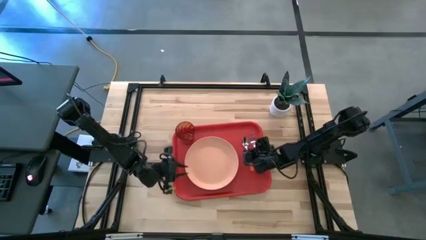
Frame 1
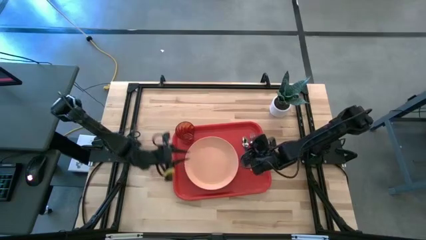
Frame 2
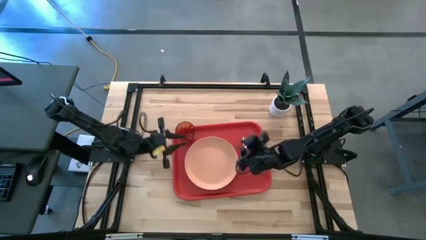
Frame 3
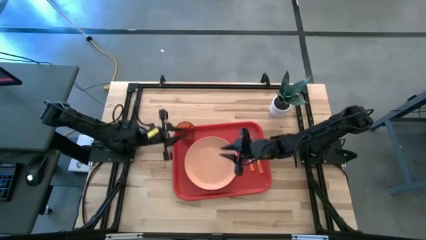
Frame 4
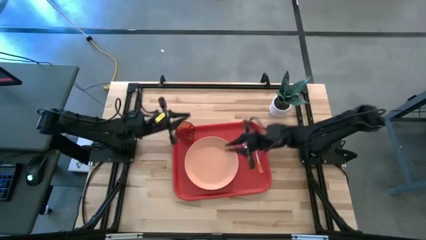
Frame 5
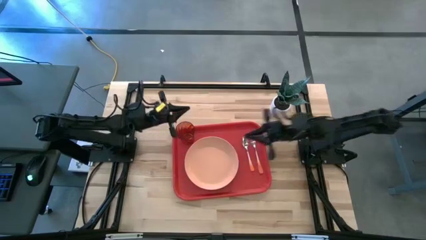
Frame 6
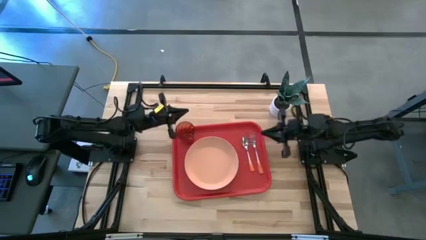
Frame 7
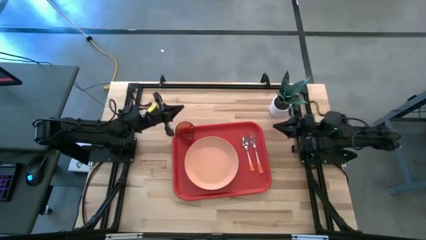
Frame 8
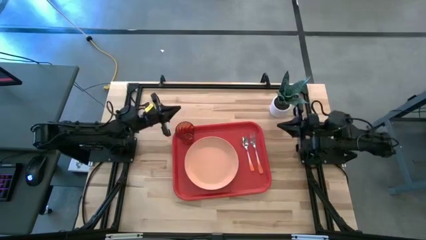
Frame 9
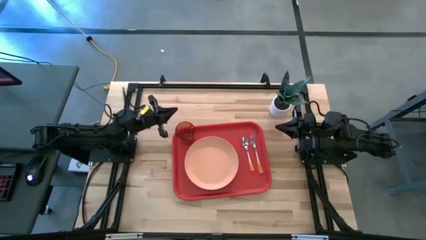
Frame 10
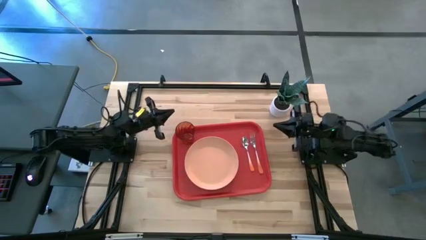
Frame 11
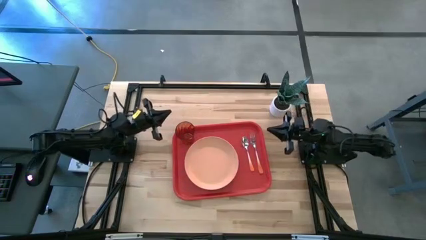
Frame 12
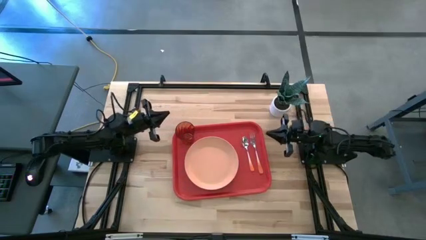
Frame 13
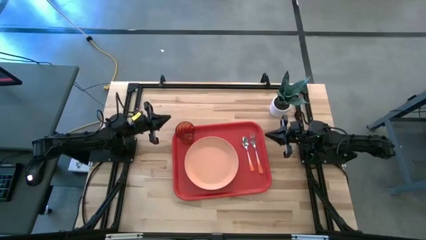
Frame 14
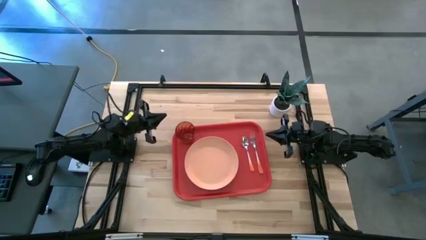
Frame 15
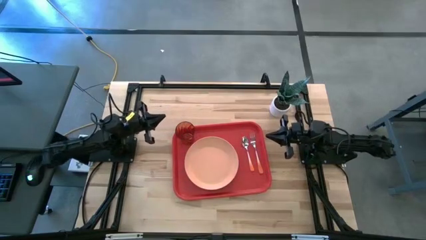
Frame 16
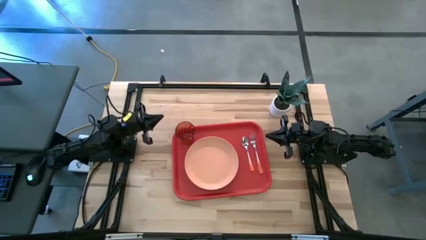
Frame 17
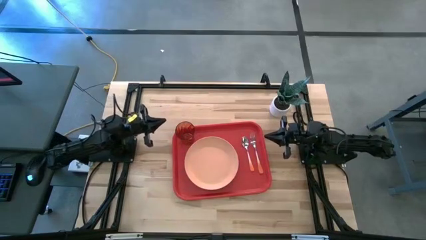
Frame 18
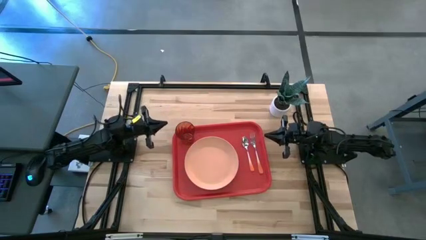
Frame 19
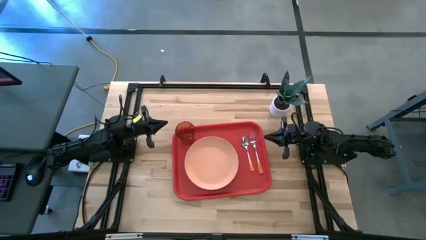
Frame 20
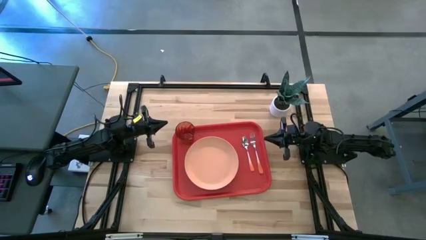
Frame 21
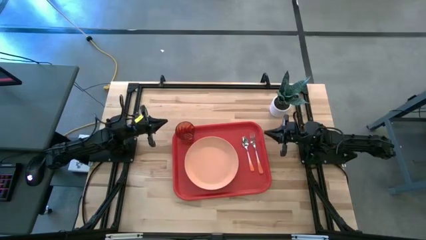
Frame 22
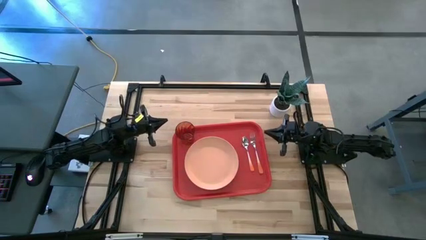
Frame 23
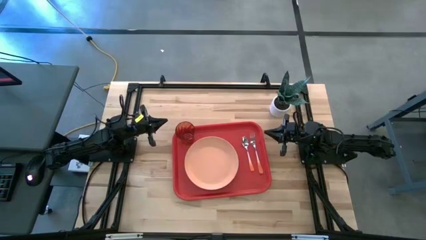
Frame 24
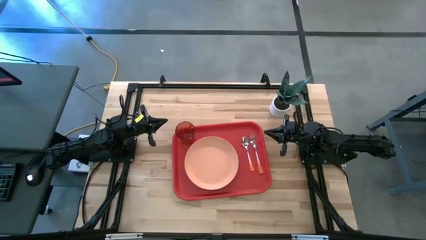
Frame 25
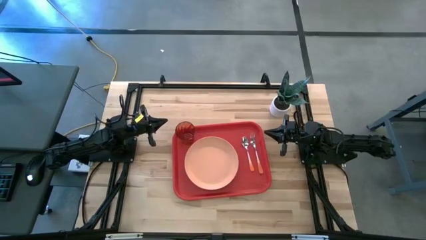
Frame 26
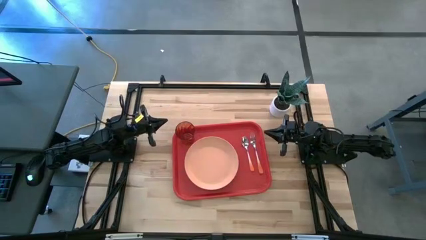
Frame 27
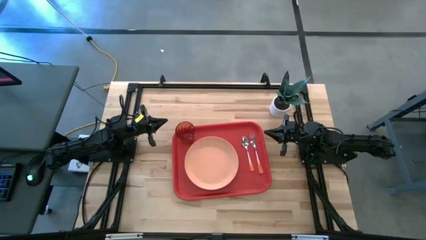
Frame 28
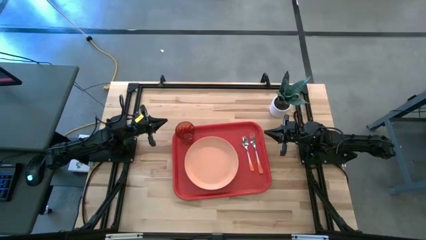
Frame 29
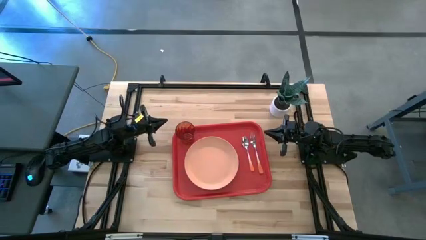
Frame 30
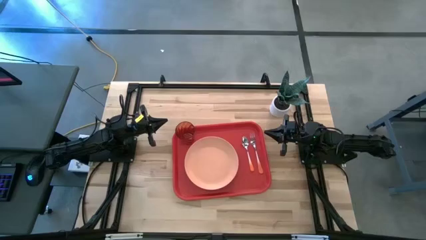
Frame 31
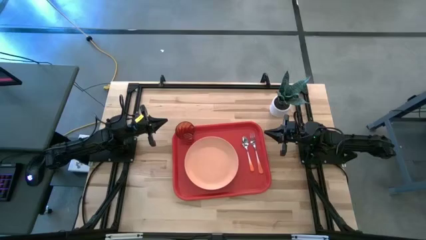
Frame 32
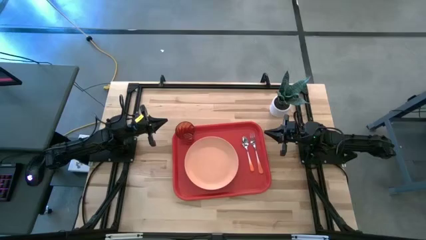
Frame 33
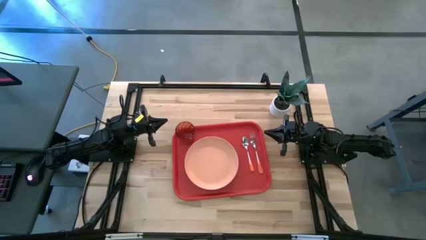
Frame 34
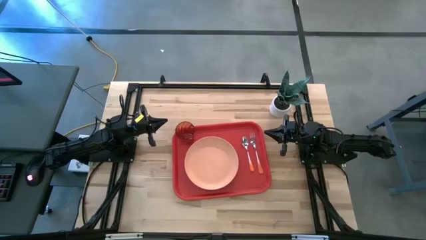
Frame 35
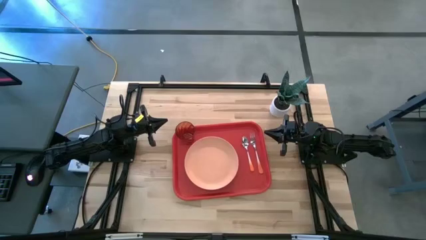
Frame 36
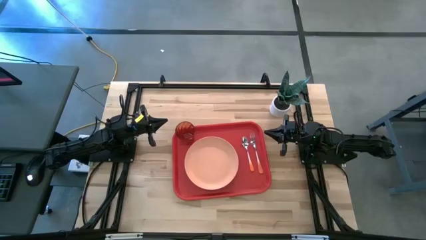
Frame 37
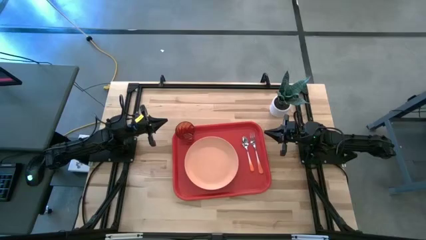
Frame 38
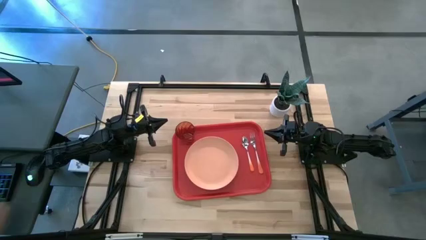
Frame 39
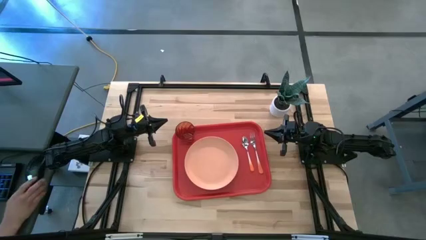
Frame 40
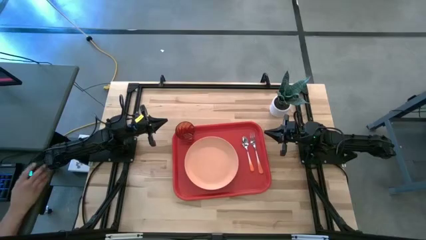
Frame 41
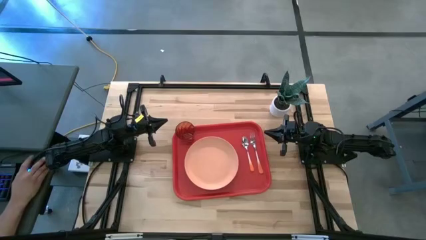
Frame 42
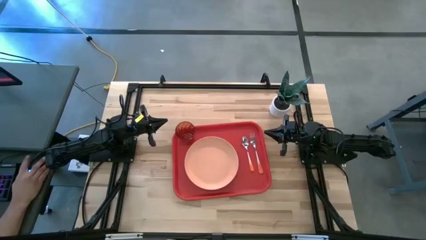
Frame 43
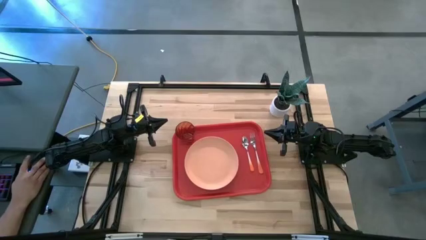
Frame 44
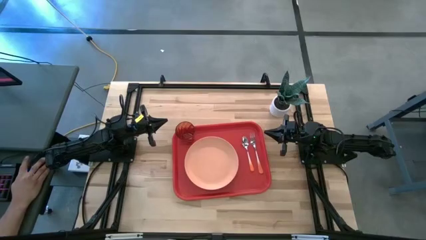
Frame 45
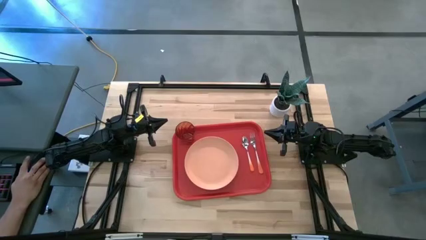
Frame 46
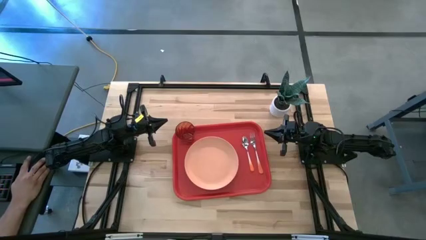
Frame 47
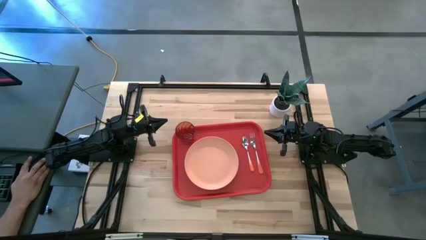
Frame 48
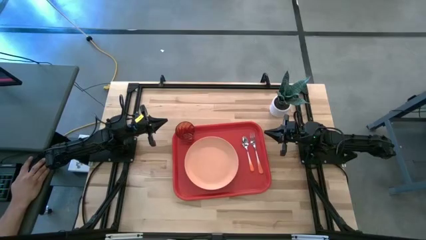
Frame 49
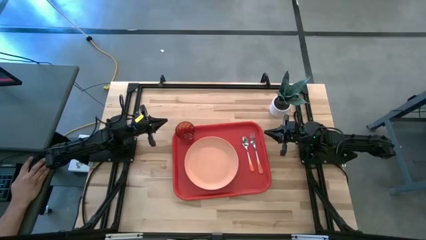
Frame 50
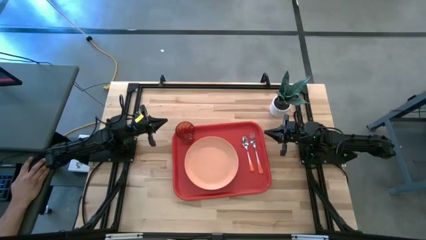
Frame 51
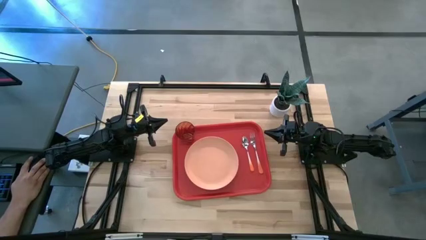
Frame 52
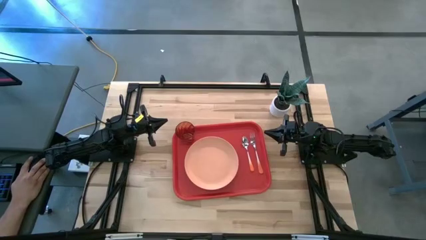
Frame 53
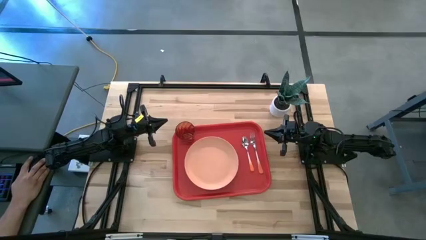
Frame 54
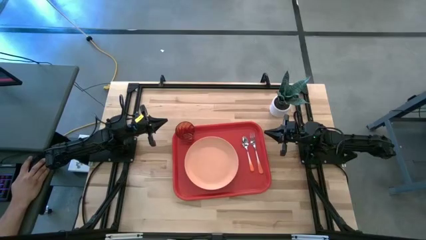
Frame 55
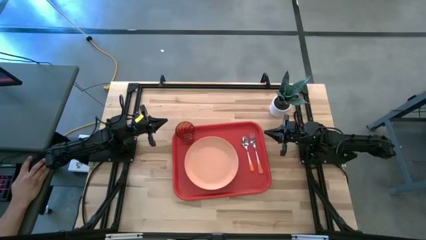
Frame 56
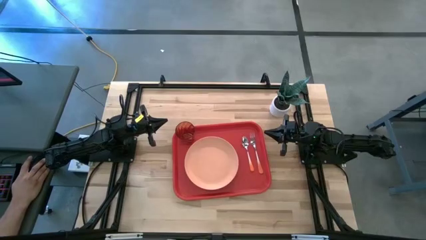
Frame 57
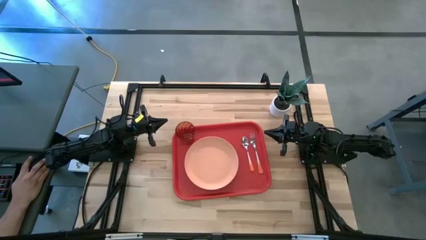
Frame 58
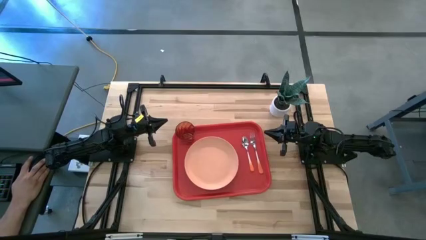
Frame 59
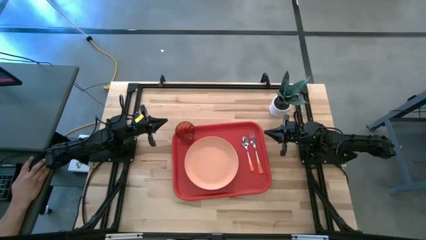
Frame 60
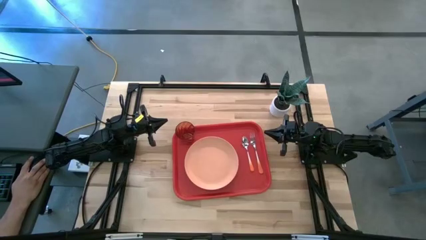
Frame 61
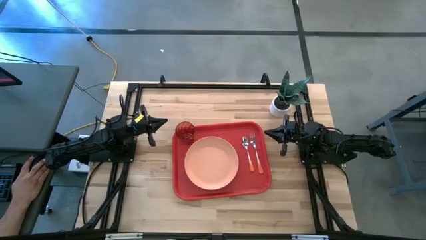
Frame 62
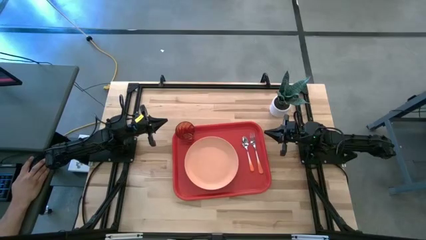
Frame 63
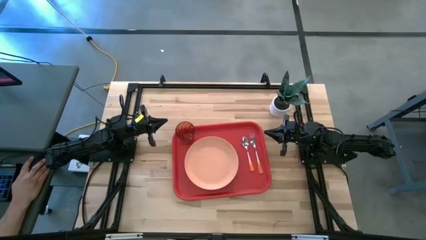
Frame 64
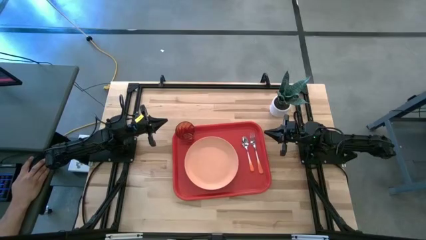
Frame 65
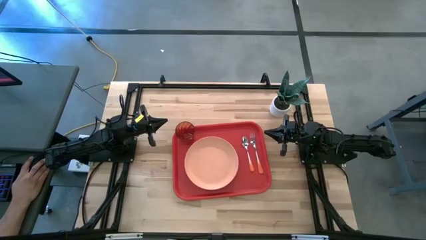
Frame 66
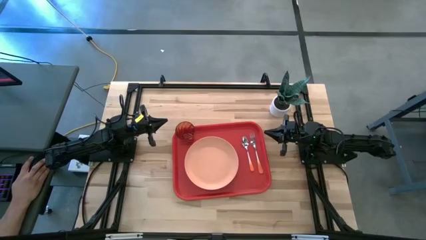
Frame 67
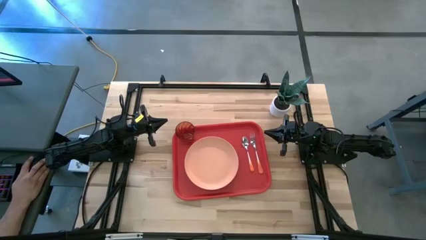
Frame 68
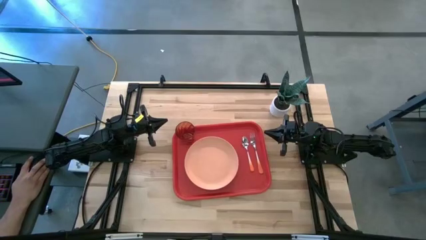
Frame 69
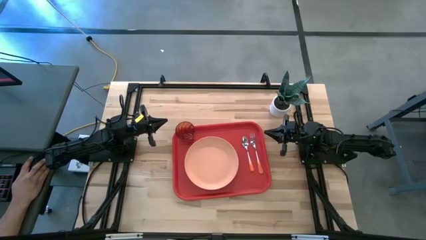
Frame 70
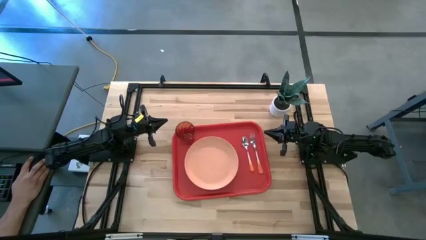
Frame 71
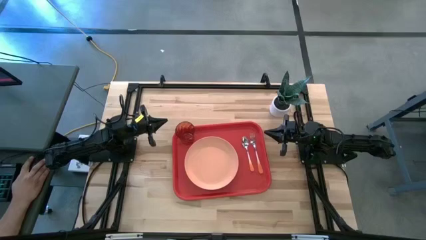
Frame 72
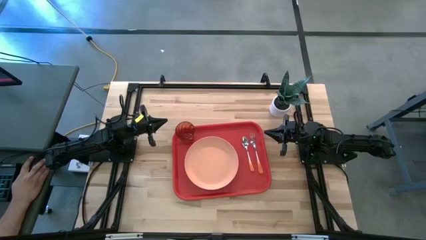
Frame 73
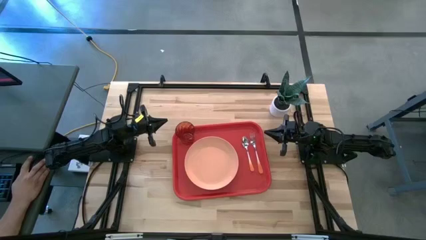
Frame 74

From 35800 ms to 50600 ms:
Task: Pick and place plate/cup/fork/spoon on tray
Return to Home Position
